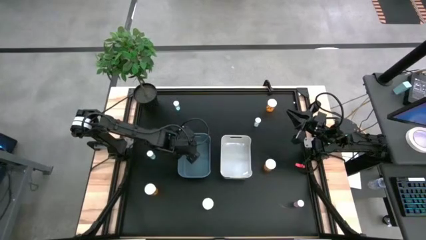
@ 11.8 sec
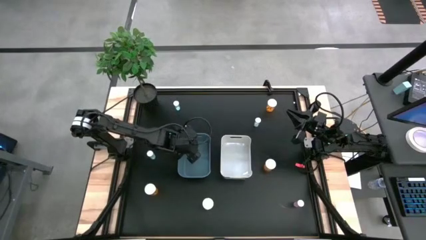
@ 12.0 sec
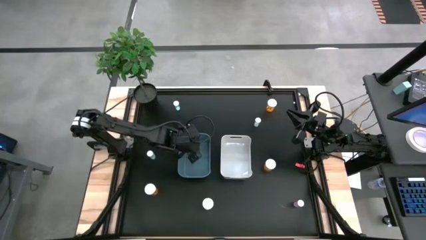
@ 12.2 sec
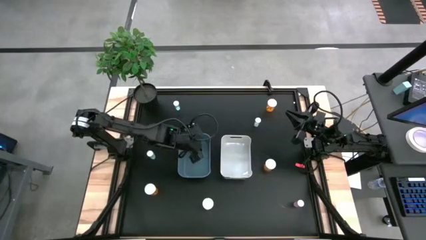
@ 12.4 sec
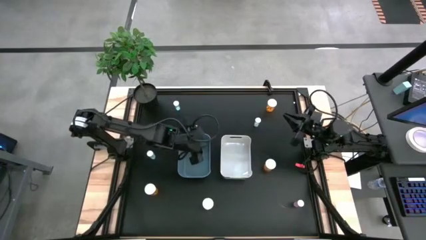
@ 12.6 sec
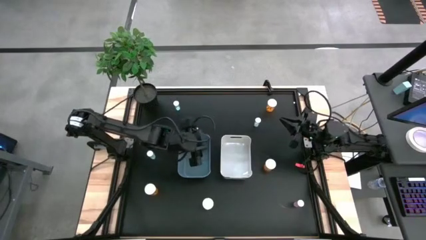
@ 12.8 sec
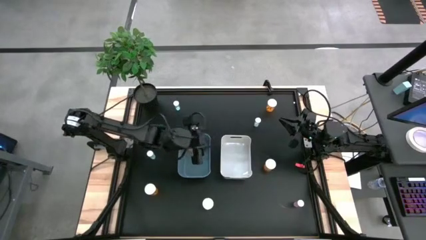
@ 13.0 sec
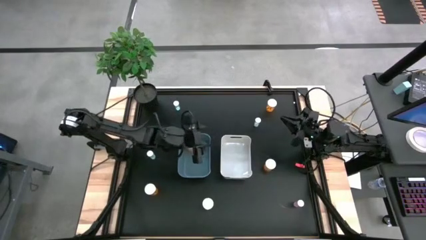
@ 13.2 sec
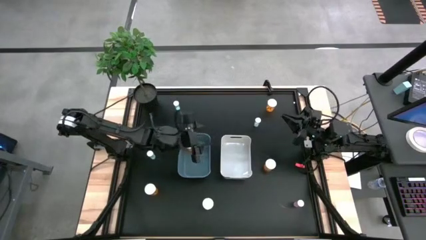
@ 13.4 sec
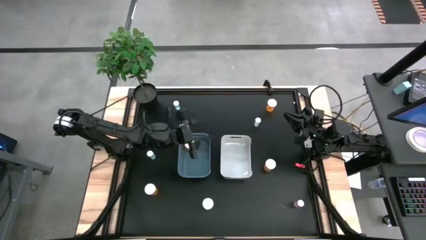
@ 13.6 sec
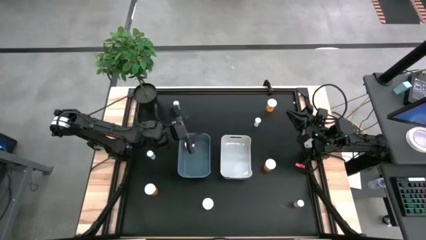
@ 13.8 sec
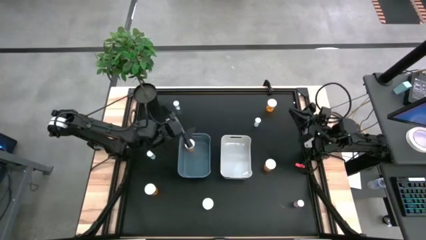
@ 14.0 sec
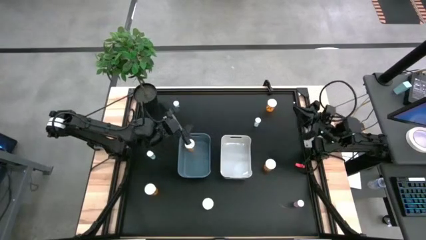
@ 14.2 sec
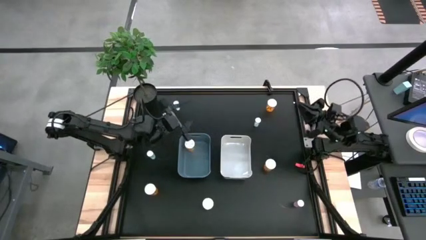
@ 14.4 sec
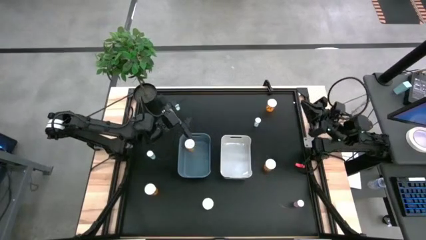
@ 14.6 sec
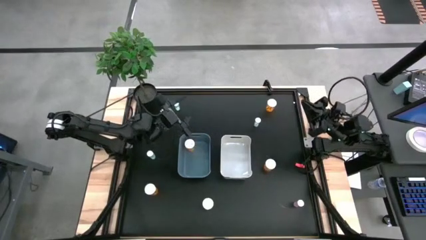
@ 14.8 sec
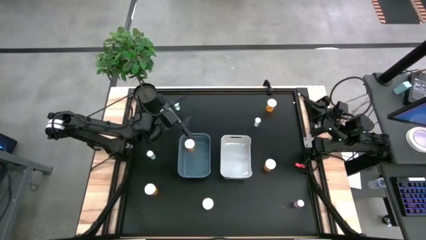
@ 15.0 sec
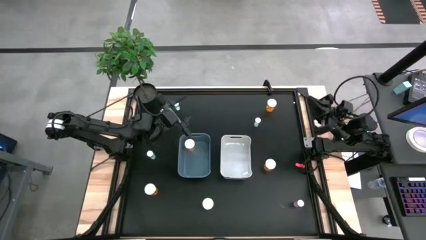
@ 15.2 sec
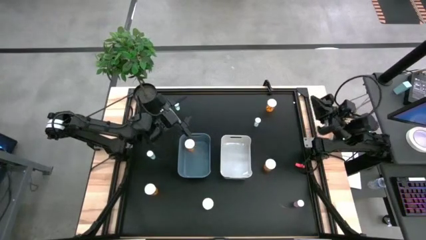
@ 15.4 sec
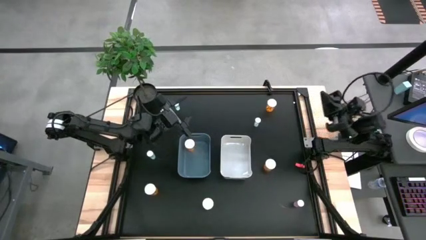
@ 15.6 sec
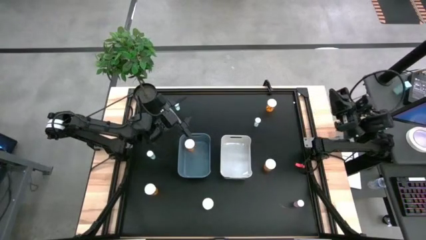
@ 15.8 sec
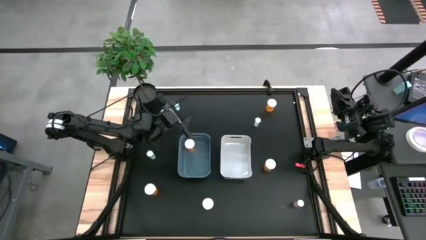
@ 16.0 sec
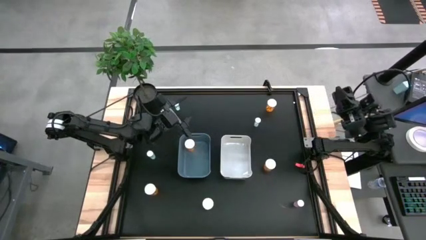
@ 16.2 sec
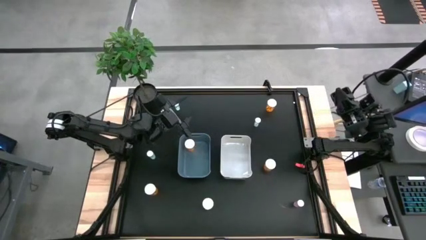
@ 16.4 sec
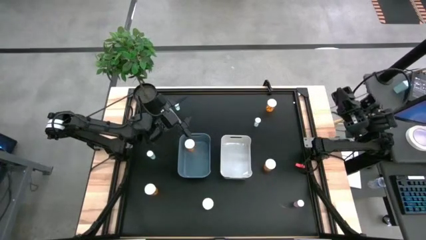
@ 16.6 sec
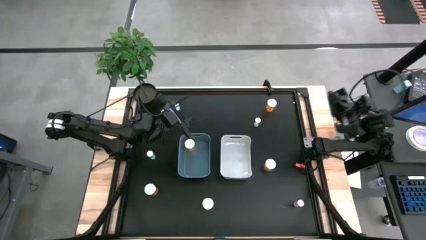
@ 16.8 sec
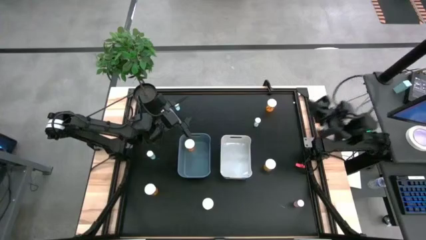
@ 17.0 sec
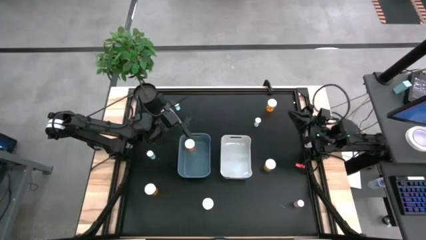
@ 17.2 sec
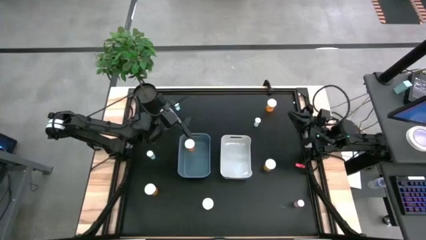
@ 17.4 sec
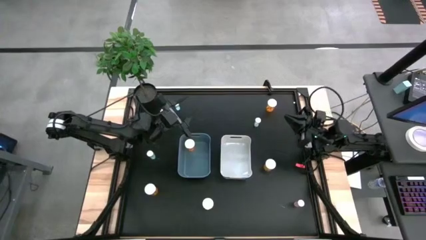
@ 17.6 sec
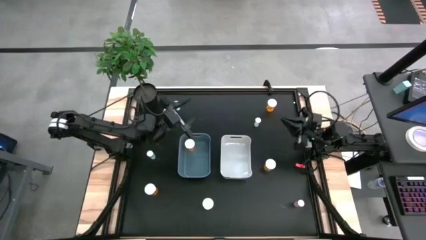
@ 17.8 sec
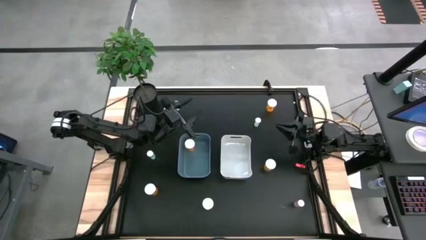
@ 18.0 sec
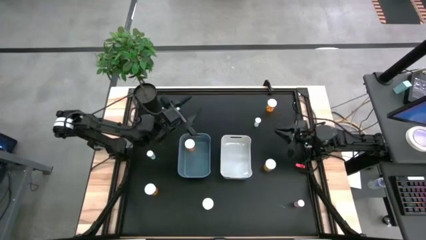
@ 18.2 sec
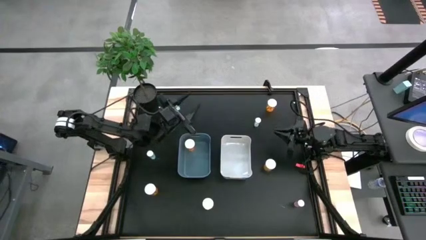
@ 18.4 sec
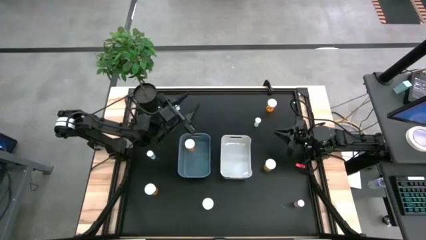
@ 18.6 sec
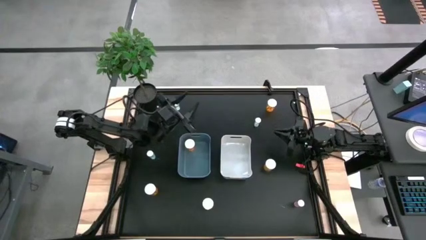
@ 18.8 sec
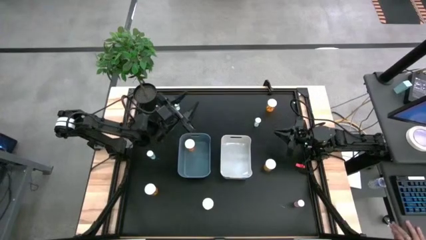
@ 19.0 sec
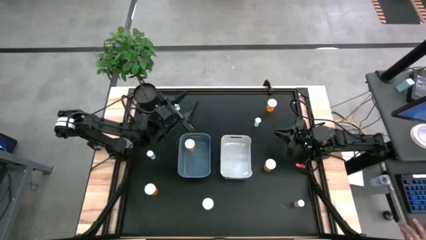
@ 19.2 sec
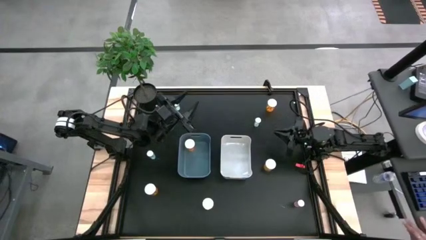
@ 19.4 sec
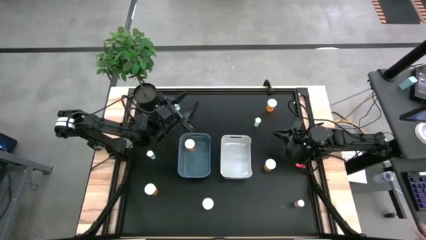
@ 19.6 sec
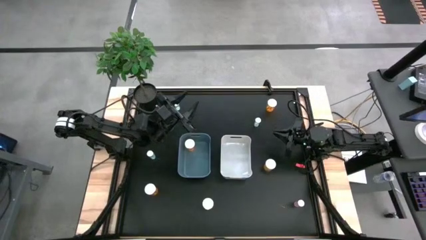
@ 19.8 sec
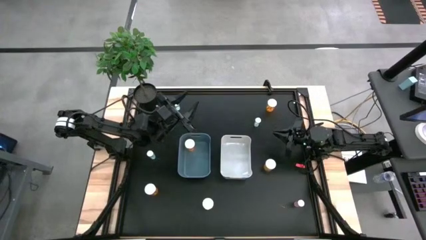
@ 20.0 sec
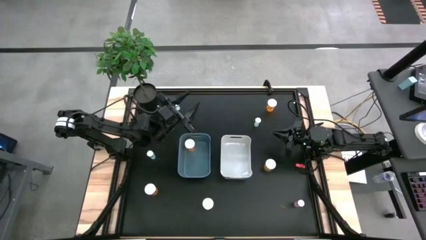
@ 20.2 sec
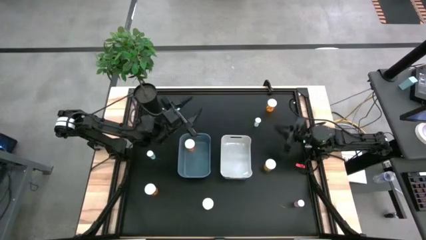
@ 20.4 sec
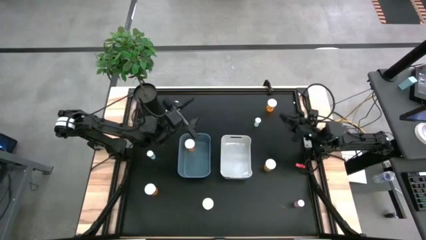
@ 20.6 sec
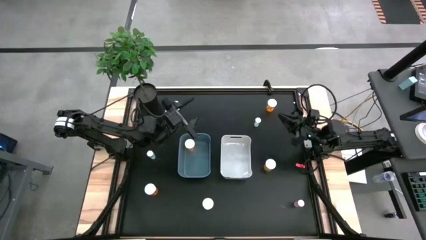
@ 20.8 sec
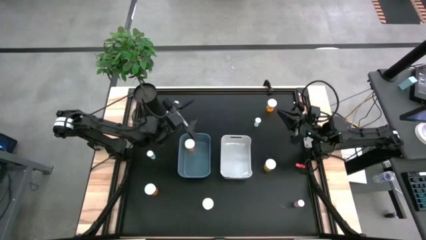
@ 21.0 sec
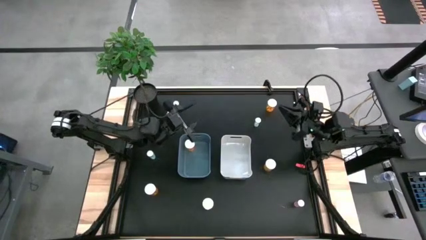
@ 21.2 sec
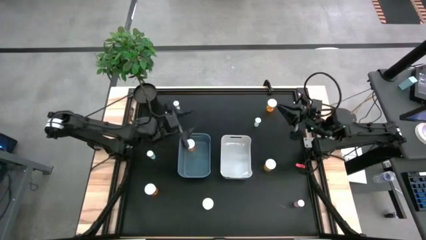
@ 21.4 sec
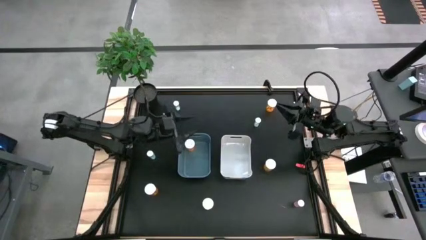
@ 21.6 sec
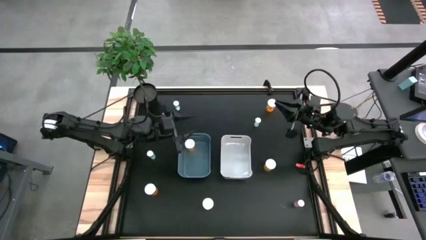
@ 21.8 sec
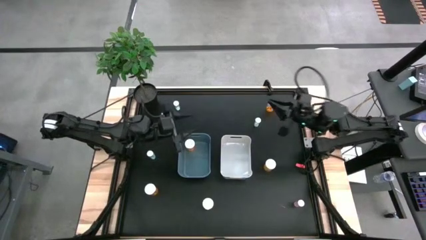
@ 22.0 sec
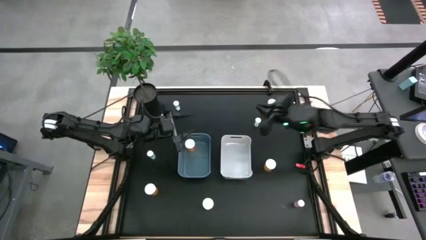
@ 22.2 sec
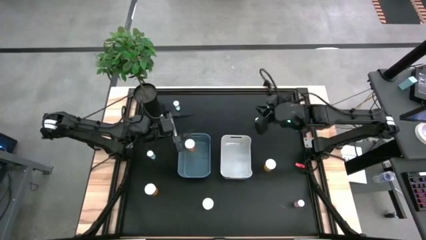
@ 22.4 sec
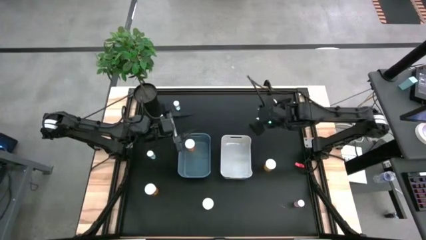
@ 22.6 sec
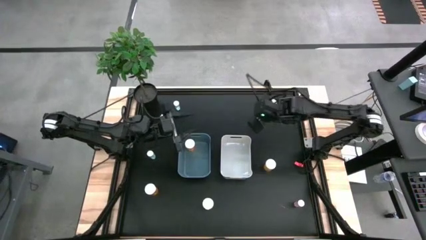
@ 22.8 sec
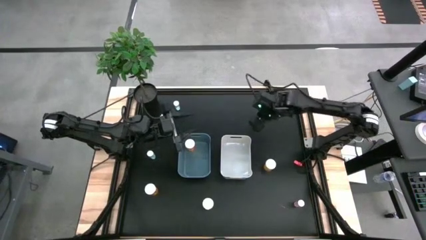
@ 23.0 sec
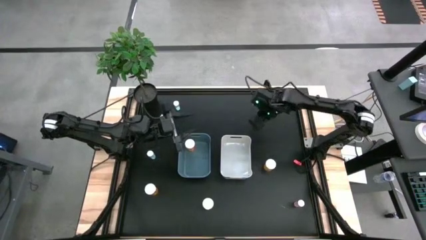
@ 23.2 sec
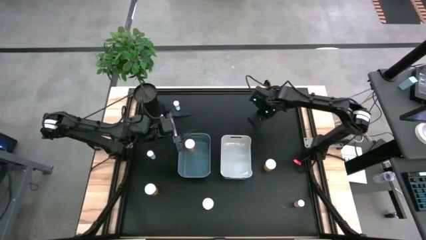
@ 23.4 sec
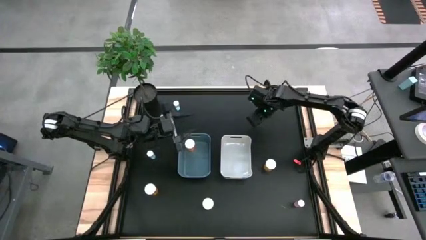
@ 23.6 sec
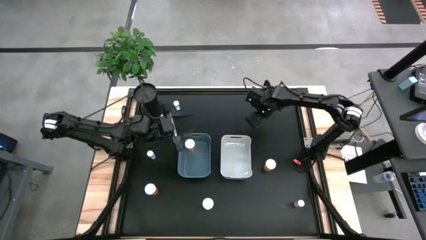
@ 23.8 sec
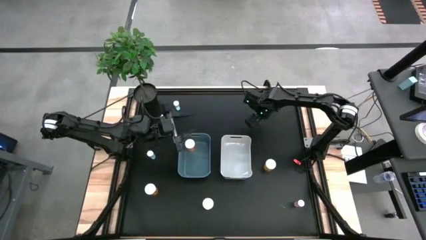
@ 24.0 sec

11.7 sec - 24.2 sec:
Task: Pick and place medicine bottles into bin by pill shape (circle, oval)
Put the blue tablet bottle into the white bin
